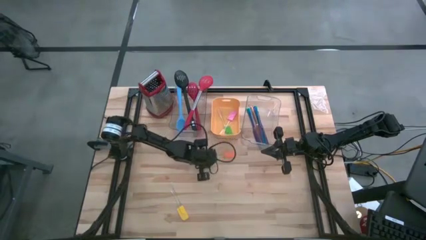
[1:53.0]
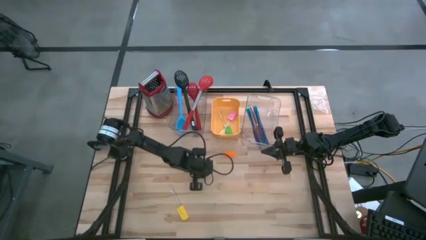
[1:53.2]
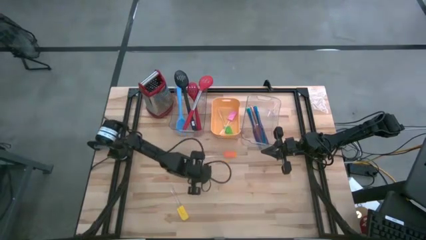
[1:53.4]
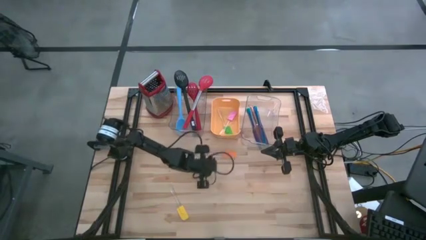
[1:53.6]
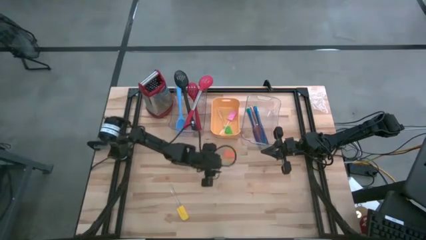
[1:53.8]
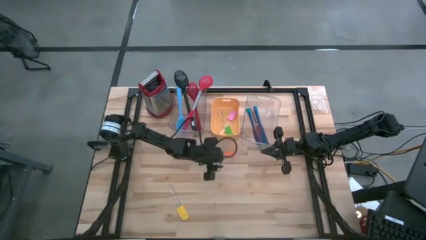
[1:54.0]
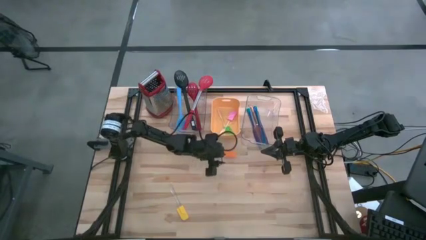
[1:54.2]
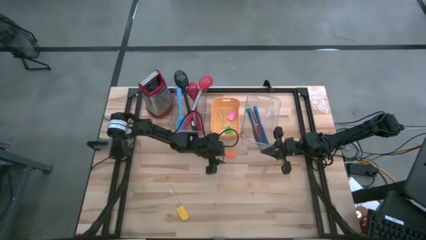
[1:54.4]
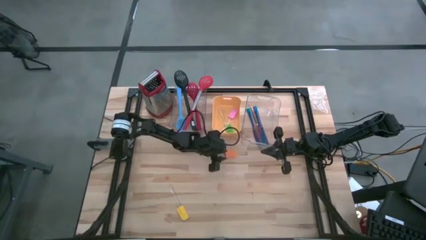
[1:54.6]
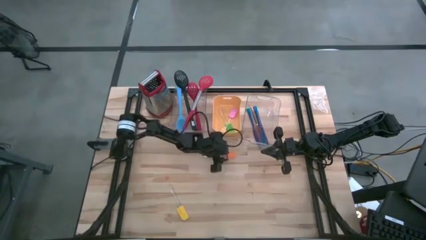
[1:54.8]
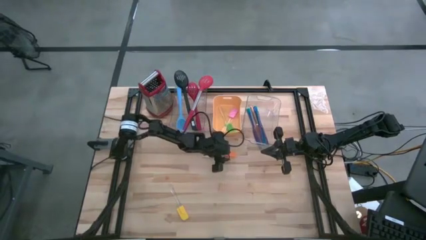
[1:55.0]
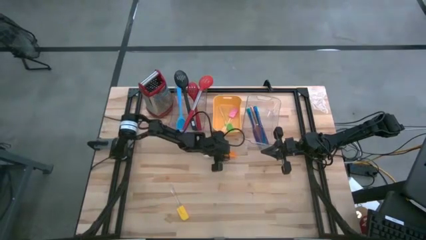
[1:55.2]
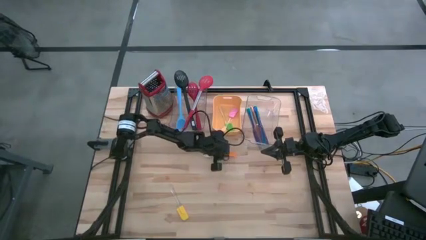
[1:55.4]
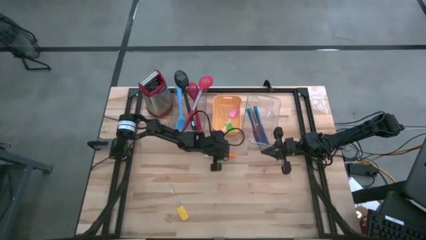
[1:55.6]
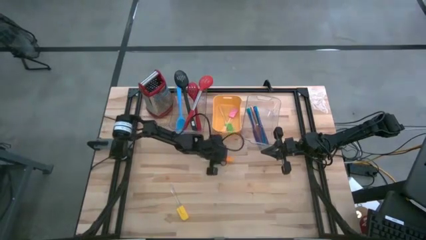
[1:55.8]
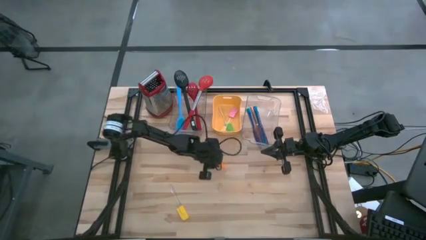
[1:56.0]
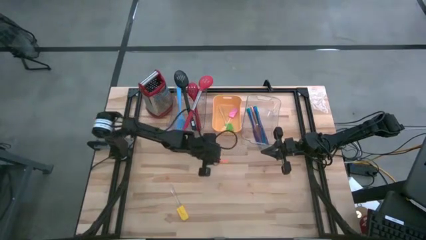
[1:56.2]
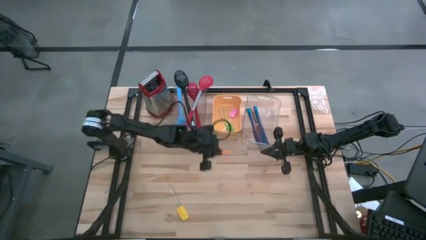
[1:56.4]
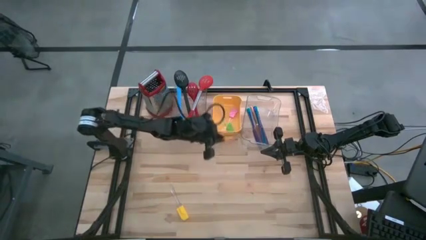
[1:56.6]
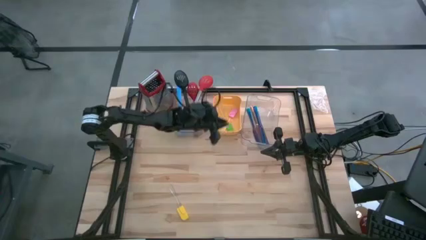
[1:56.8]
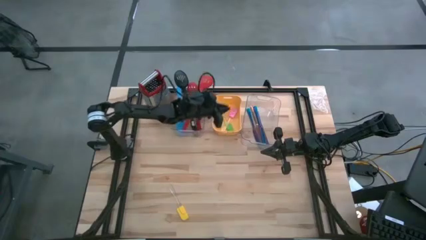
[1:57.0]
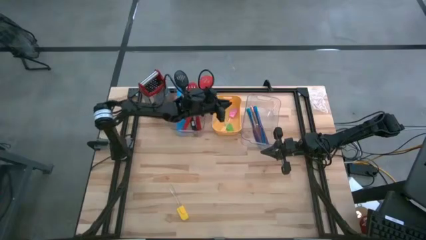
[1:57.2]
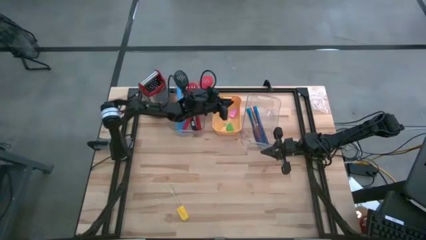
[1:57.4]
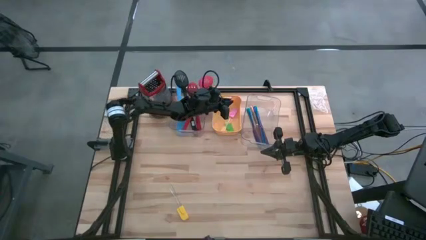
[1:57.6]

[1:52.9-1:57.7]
Task: Pick & Place Kitchen Items
Put the orange spatula into the yellow bin

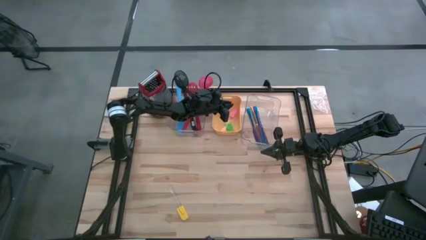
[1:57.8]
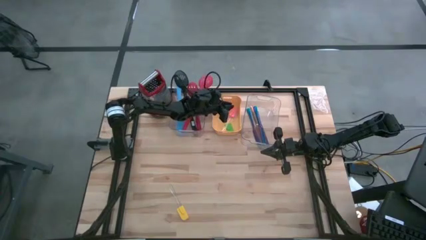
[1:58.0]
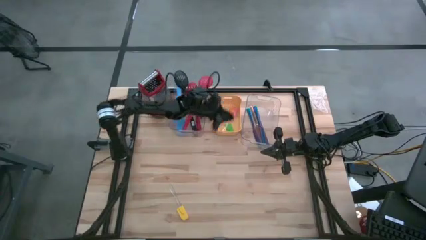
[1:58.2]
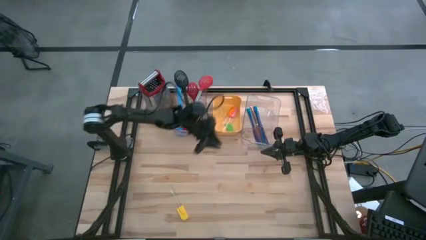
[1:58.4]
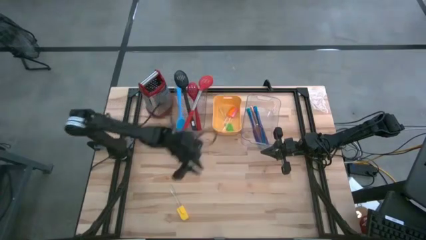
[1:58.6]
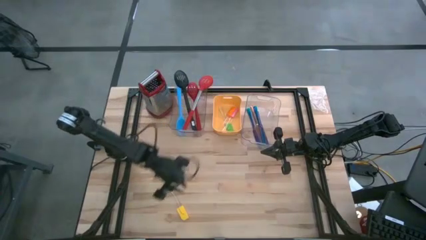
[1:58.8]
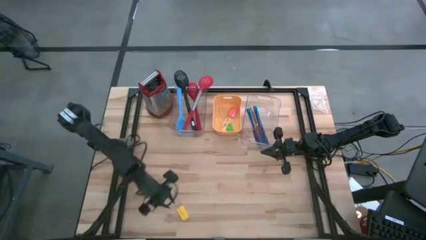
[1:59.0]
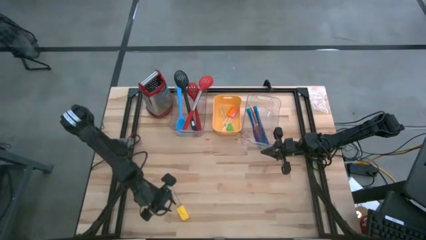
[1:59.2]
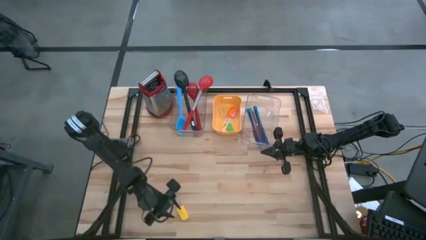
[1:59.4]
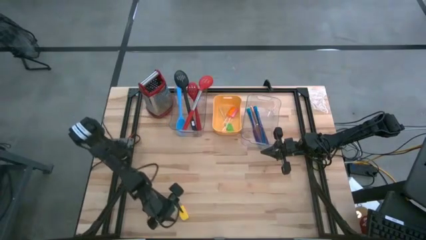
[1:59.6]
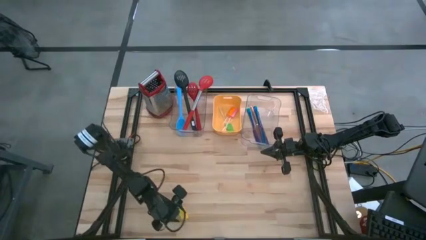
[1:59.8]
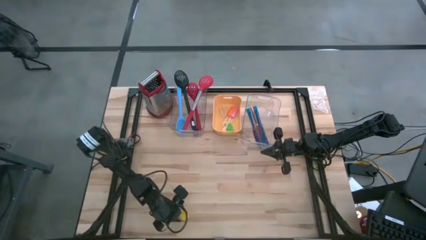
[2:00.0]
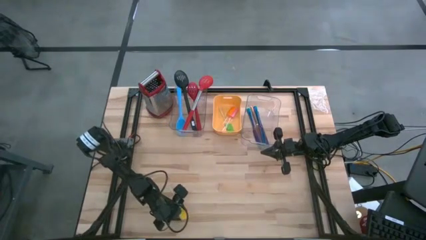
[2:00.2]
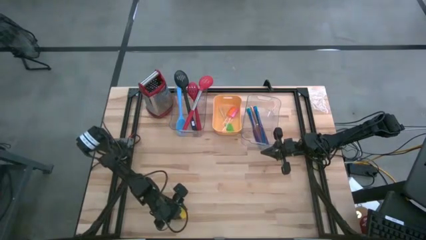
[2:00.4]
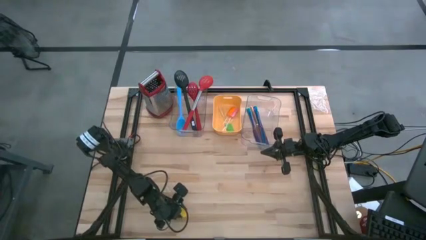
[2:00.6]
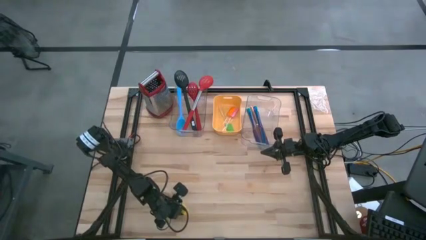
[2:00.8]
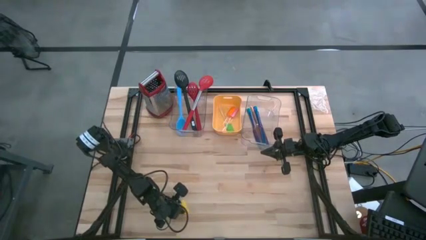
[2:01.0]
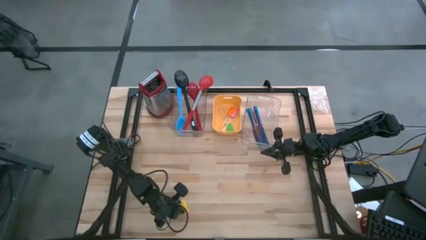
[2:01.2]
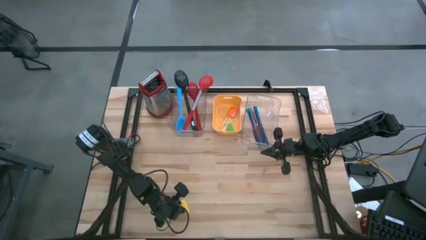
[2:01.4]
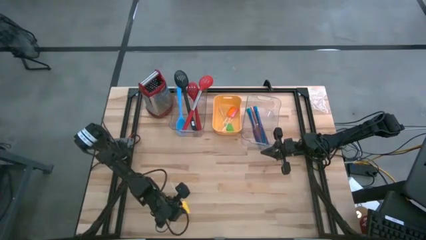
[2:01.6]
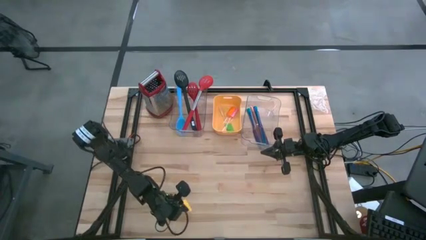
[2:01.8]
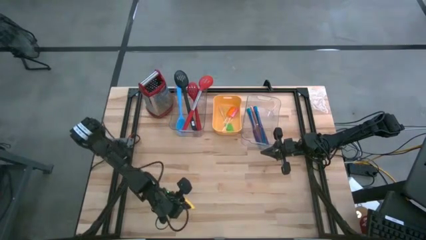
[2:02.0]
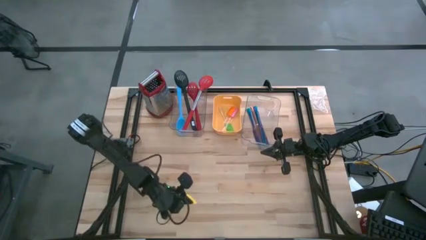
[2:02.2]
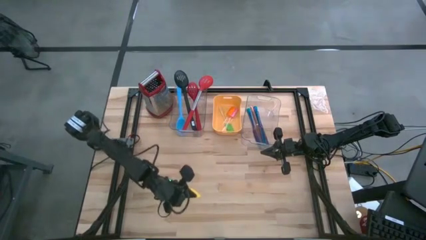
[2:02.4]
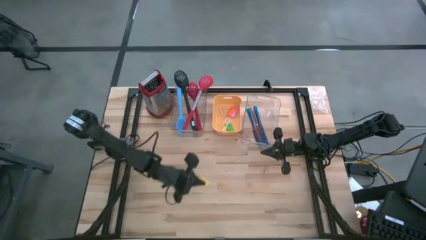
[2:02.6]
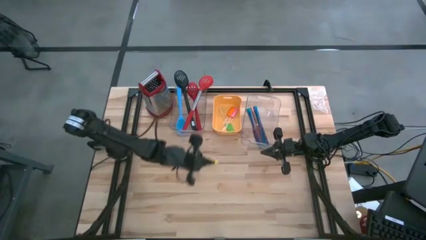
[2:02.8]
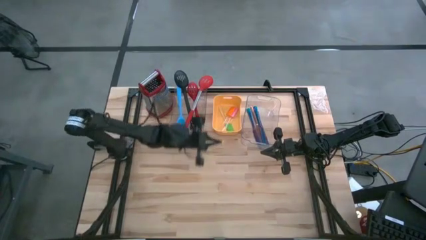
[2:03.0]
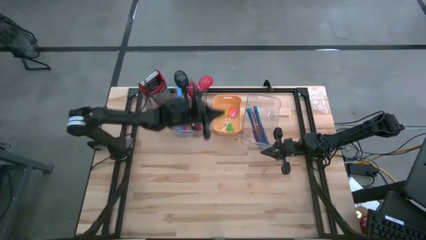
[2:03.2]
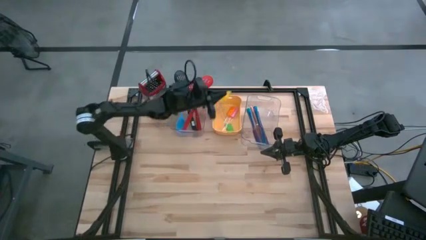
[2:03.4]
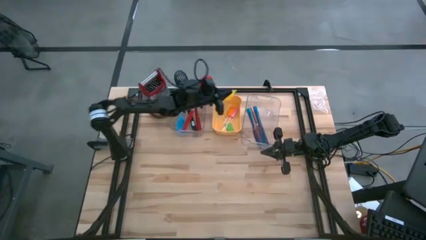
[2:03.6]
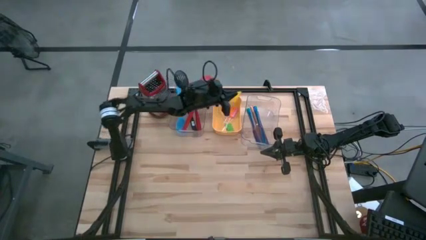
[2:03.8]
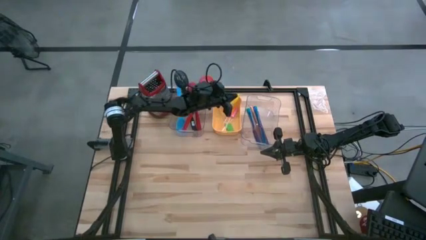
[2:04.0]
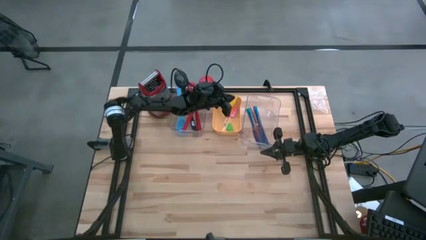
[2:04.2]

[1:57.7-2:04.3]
Put the yellow spatula into the yellow bin

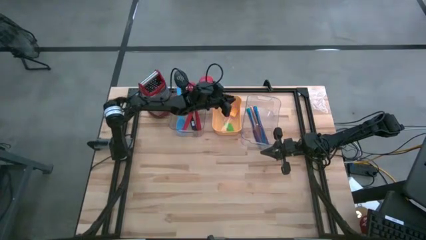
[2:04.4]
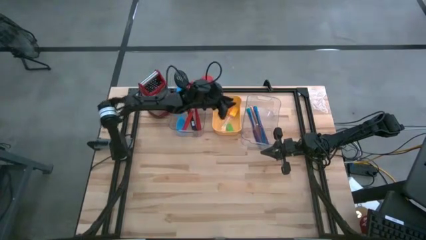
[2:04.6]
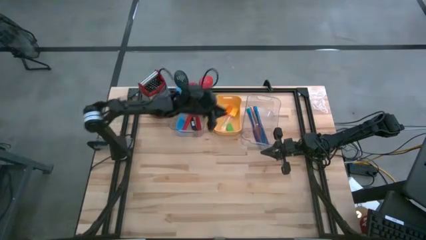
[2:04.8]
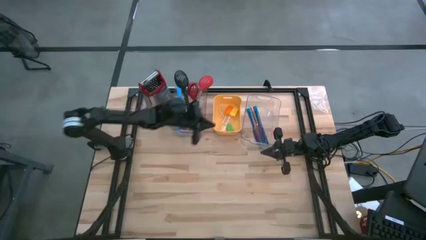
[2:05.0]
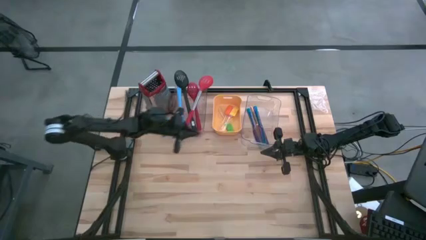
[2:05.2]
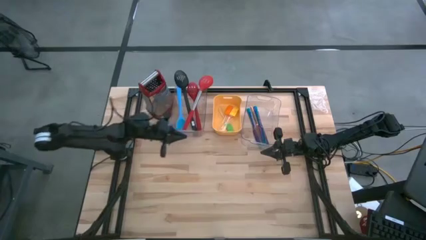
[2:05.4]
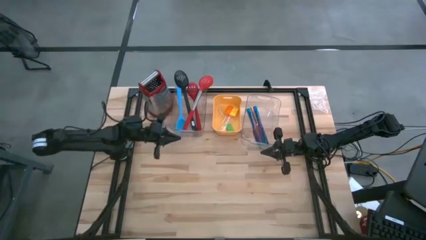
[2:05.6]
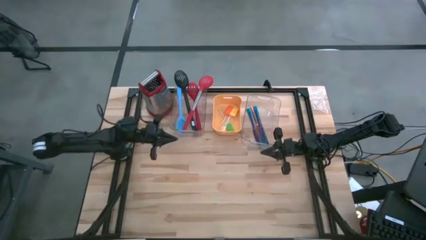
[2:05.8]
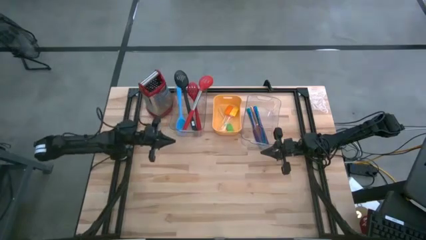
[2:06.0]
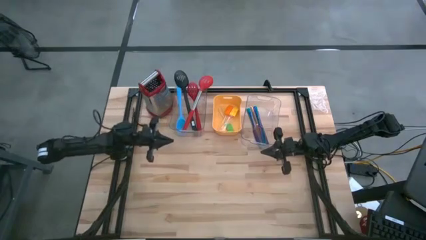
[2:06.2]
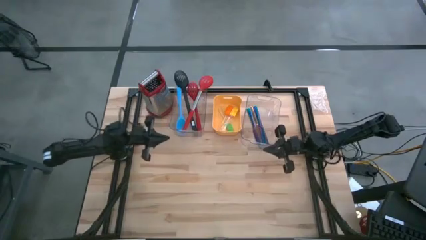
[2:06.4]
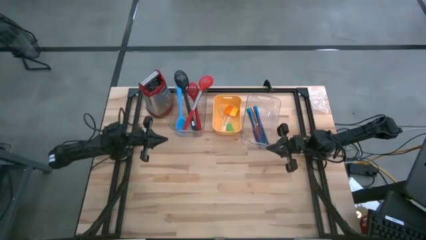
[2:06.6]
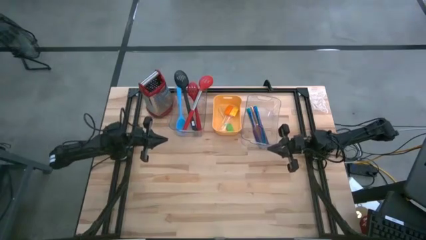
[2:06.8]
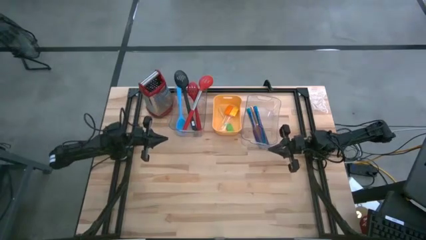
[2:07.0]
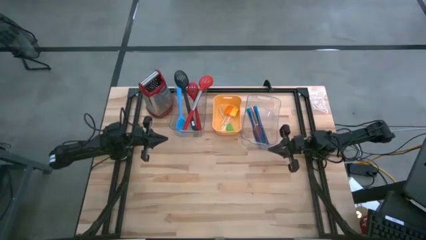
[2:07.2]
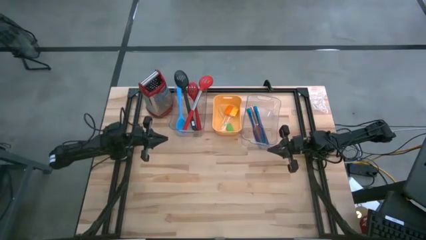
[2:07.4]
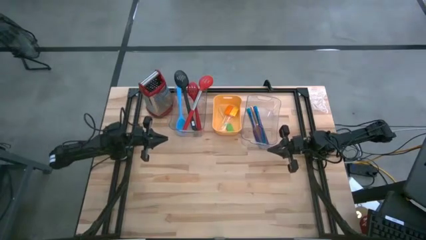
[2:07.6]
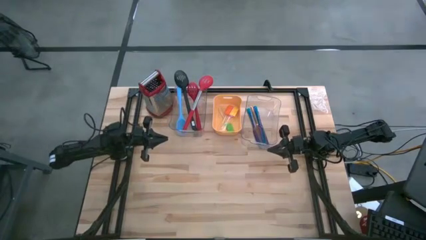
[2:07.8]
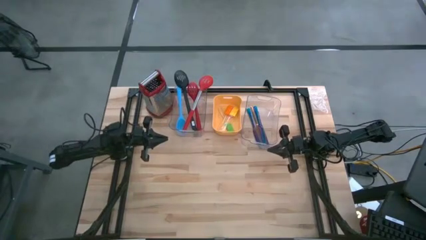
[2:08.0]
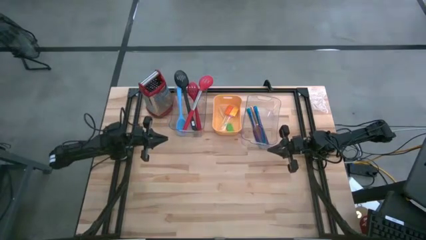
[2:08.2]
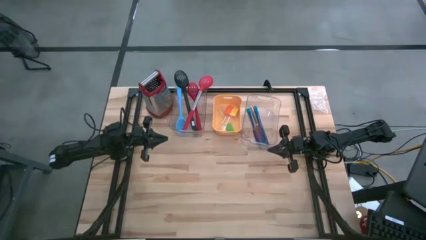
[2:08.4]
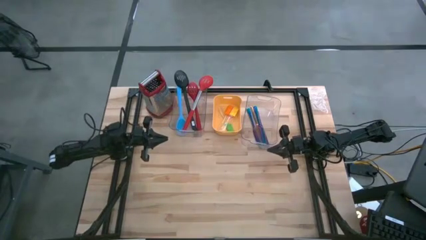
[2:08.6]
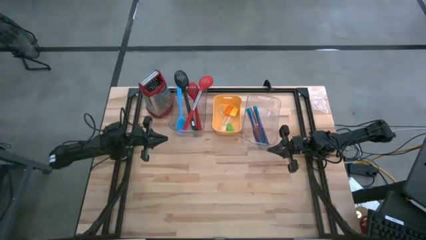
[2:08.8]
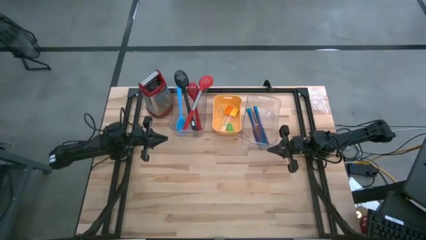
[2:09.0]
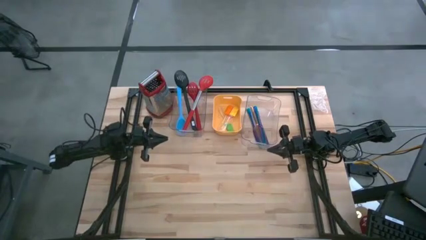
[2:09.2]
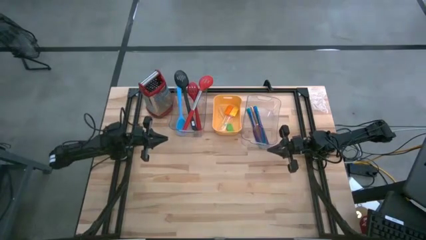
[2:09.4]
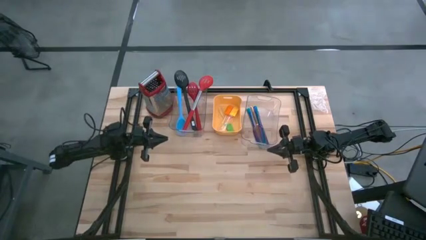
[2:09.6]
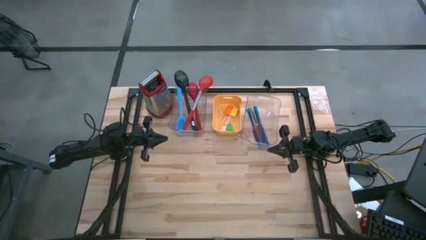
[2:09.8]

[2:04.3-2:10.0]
Return to Home Position
